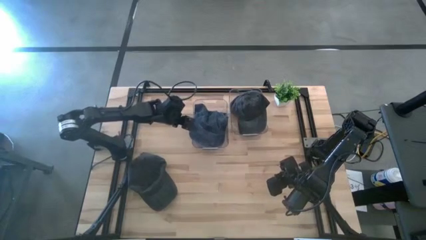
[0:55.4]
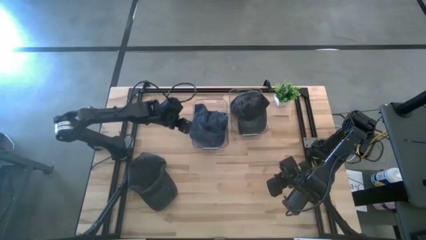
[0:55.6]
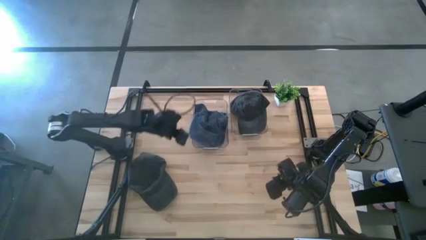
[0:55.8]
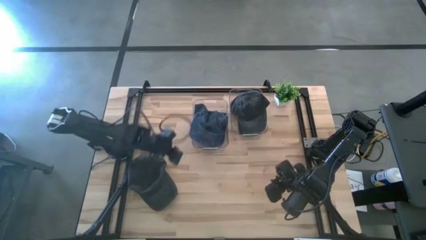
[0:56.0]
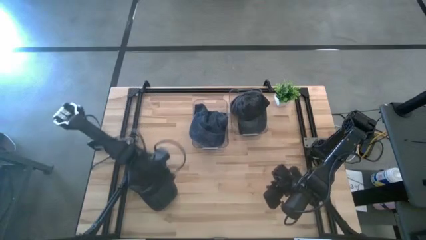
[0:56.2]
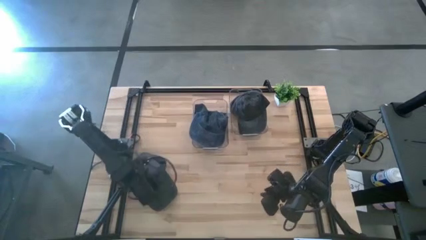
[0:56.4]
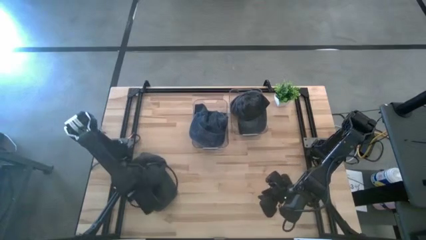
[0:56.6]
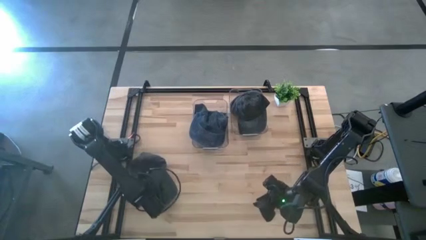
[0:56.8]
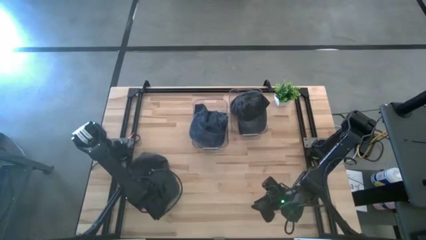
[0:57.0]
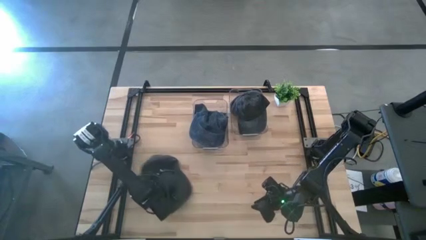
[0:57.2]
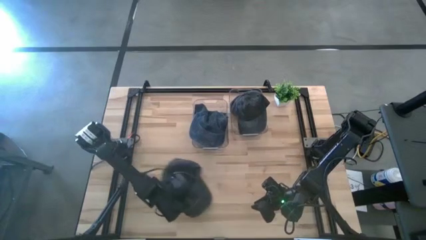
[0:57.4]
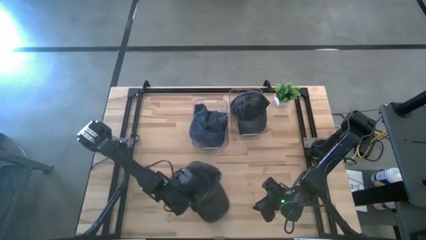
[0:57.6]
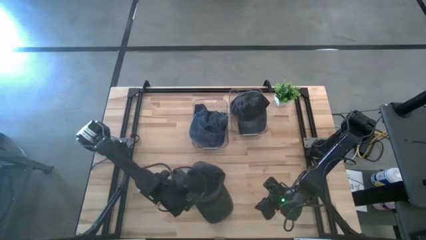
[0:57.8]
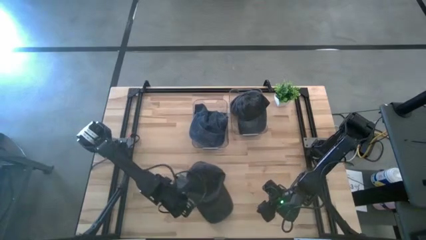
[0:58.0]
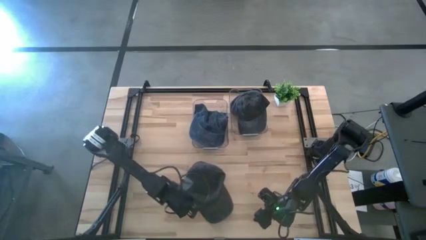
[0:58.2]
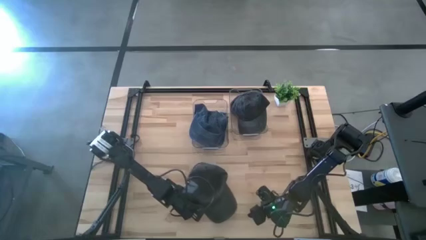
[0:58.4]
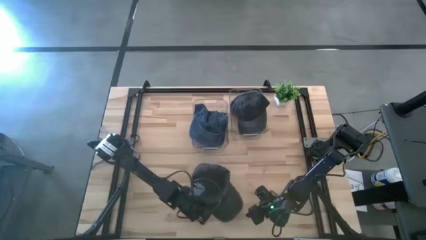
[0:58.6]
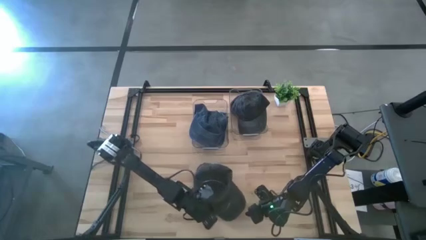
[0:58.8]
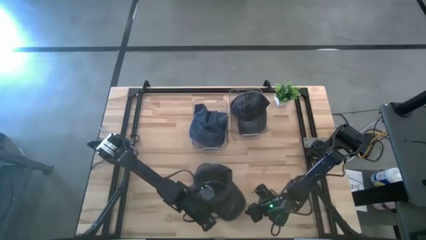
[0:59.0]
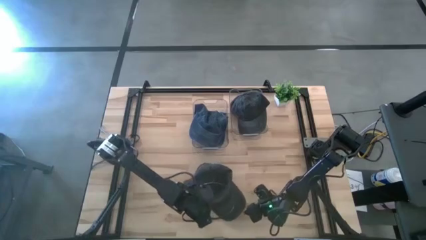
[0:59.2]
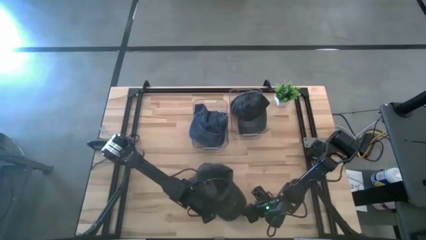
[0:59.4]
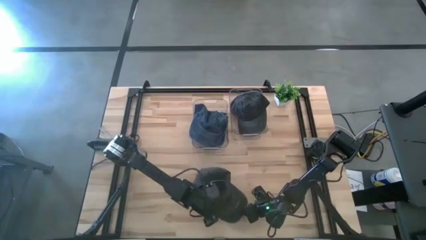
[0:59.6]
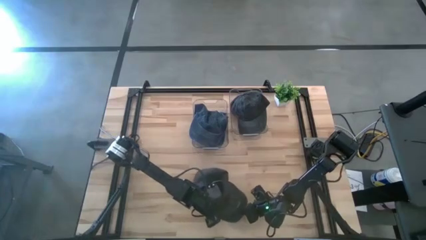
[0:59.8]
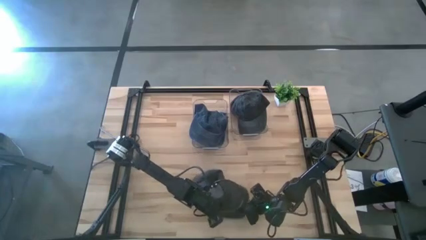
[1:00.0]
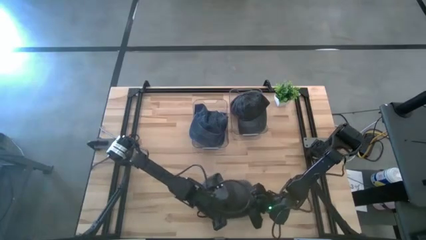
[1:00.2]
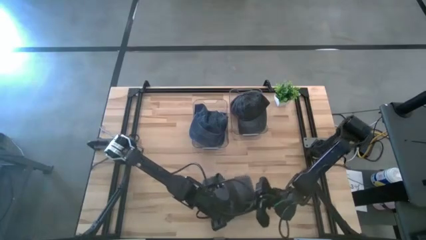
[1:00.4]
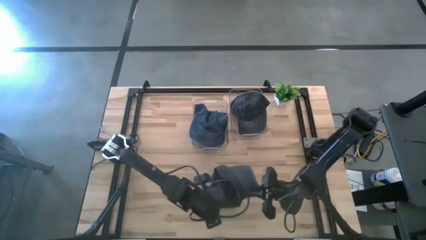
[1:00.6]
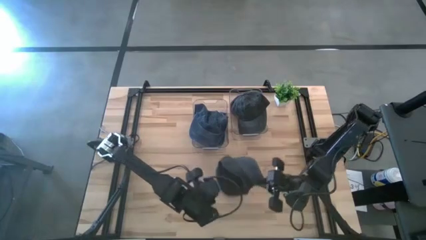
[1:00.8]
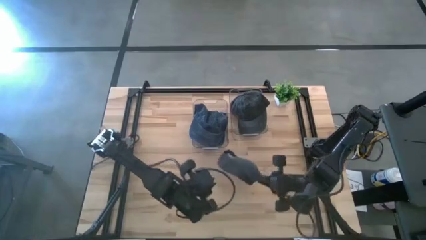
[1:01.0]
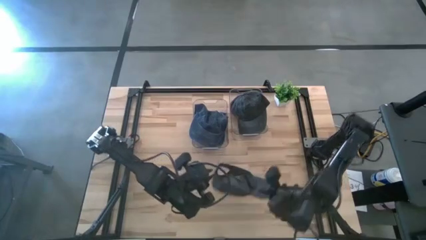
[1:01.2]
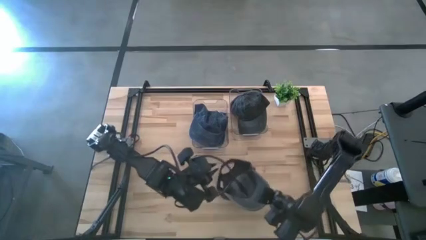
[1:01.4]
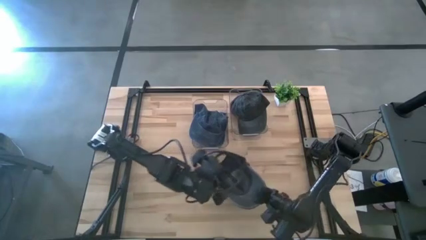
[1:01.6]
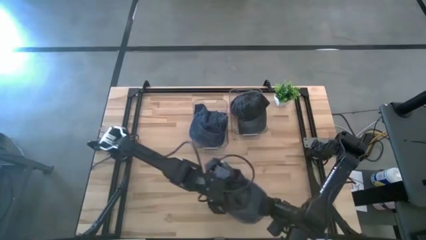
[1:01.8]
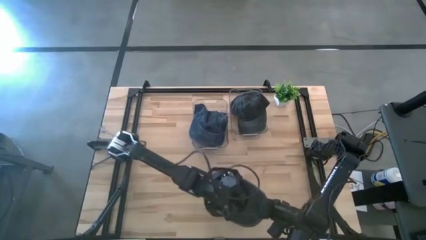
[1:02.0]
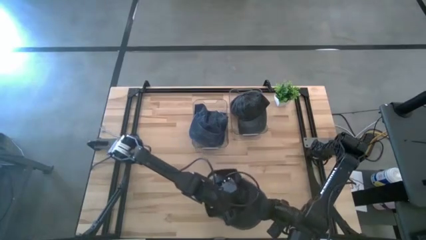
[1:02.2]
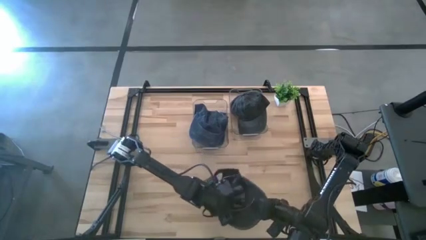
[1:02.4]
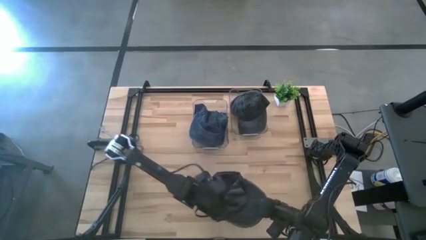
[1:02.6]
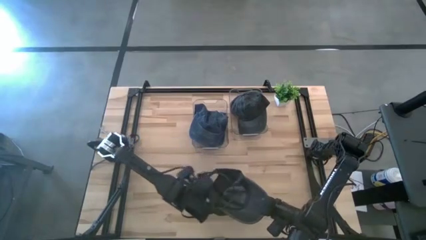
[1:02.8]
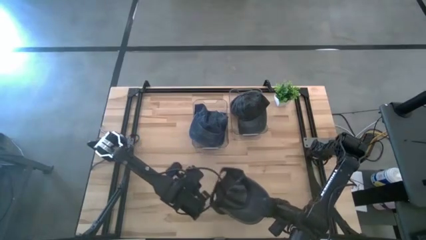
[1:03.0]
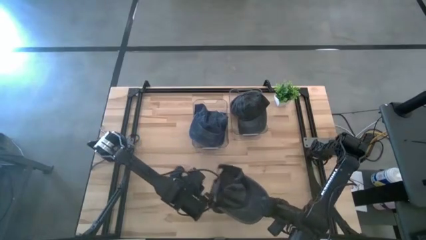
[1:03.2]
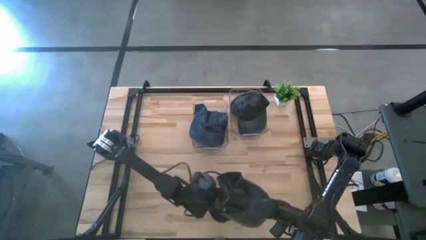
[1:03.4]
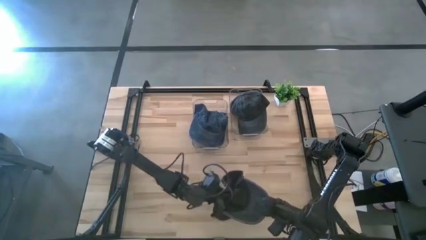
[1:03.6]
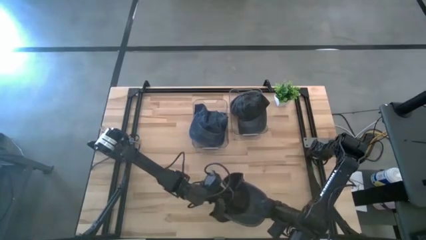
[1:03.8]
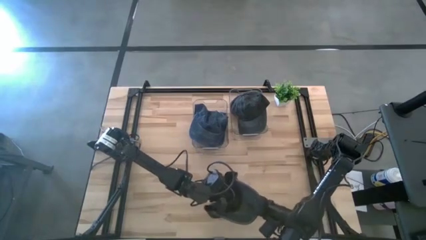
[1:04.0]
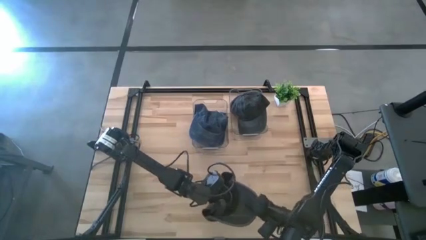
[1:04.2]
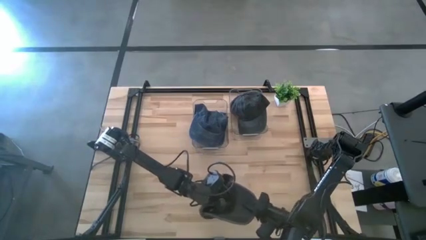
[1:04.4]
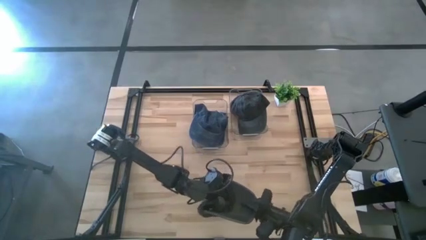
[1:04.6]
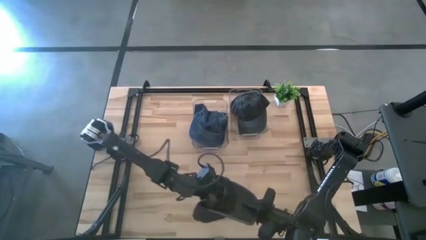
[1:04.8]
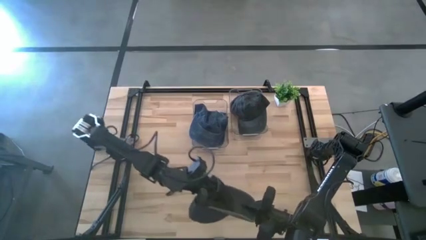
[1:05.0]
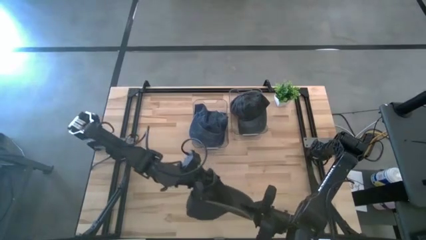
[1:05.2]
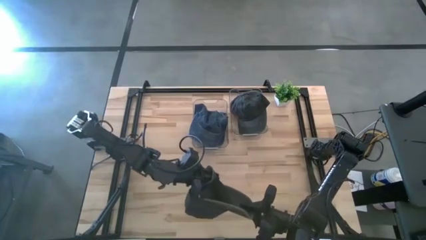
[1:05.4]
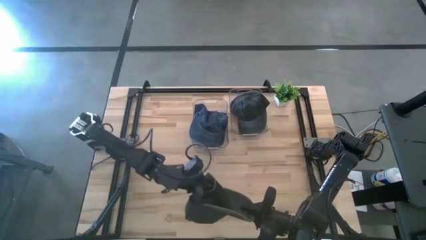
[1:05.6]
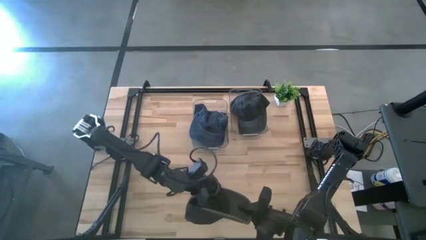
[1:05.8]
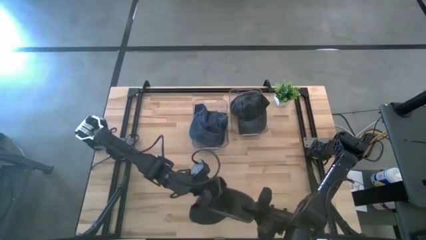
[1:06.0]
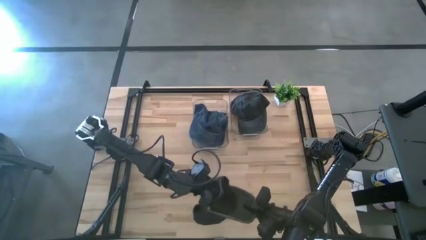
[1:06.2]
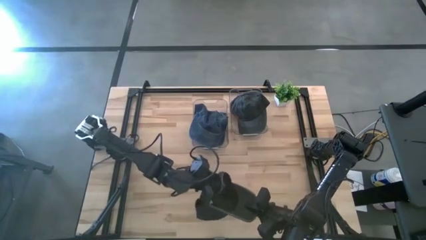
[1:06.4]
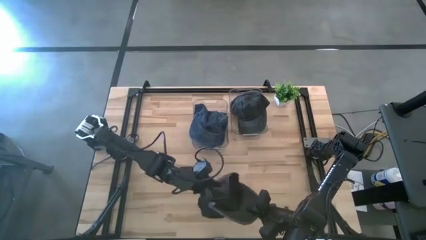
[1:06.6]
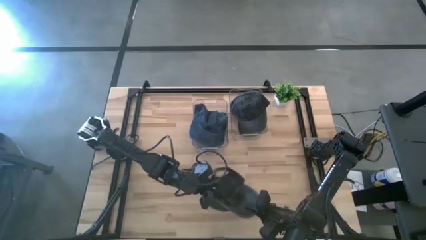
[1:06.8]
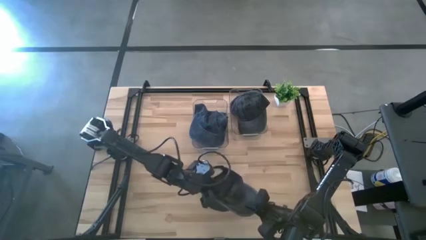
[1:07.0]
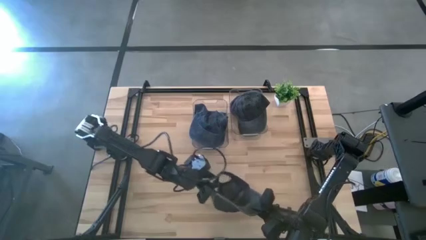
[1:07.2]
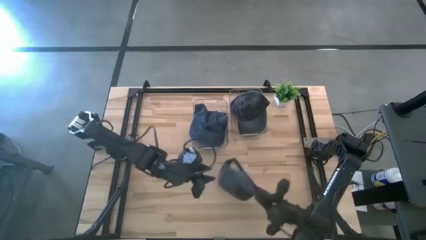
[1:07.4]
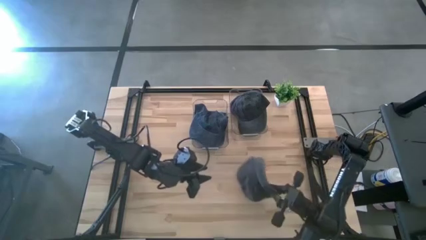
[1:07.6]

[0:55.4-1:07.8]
Task: Pick & Place hat
Put the black cap into the right transparent bin
